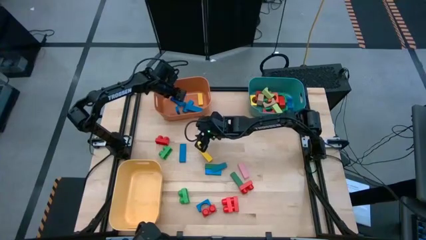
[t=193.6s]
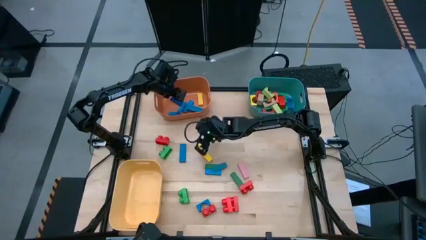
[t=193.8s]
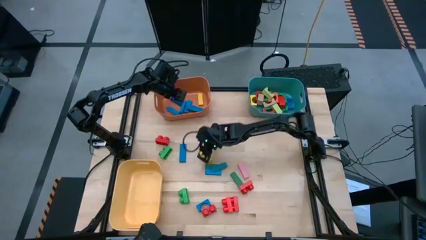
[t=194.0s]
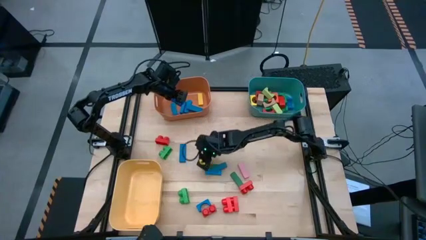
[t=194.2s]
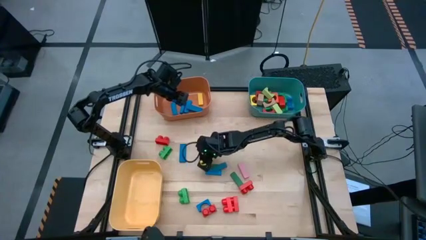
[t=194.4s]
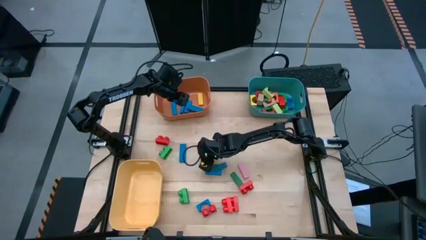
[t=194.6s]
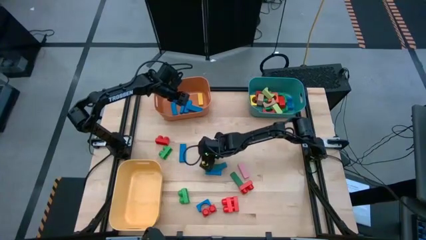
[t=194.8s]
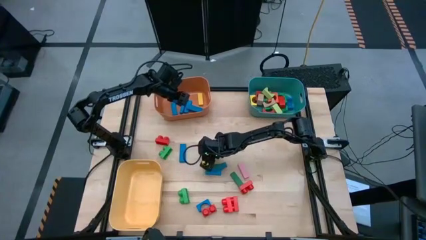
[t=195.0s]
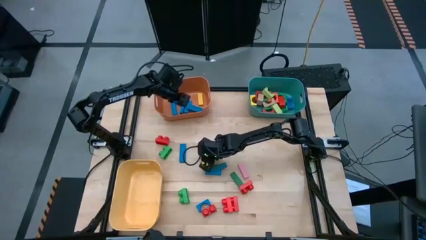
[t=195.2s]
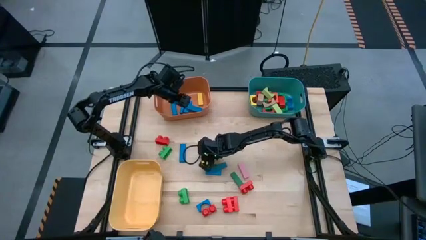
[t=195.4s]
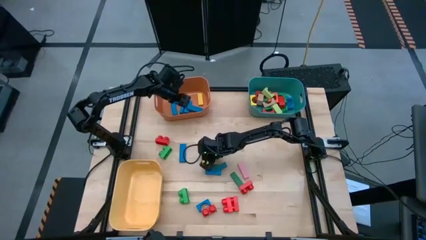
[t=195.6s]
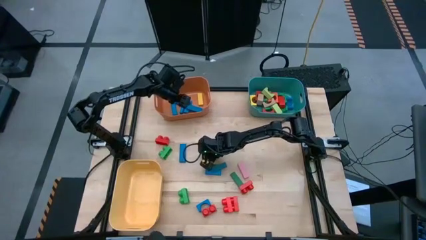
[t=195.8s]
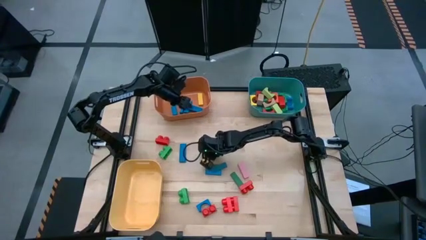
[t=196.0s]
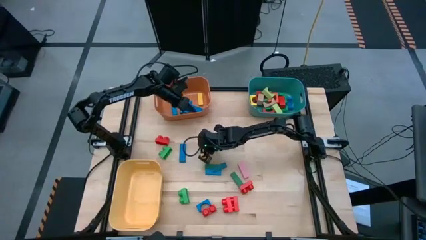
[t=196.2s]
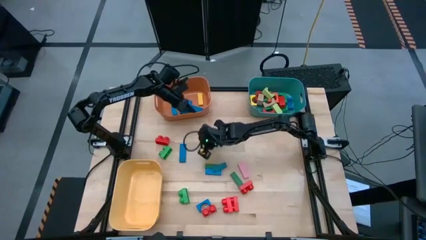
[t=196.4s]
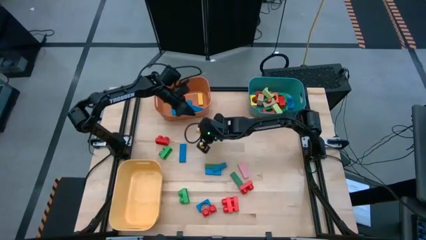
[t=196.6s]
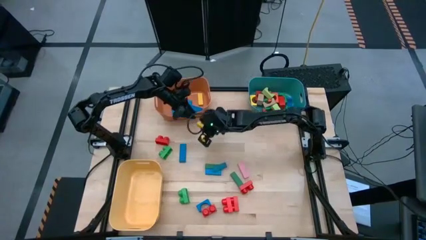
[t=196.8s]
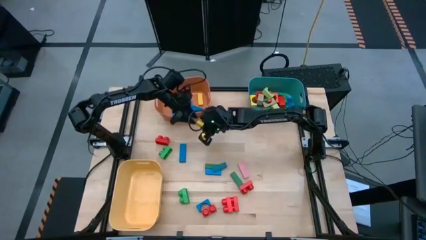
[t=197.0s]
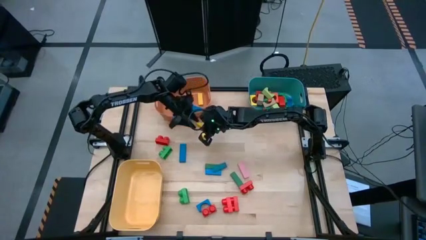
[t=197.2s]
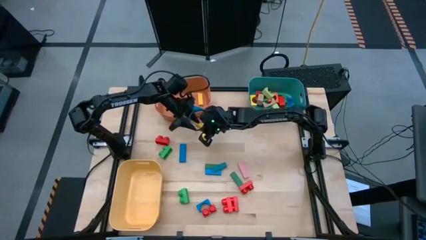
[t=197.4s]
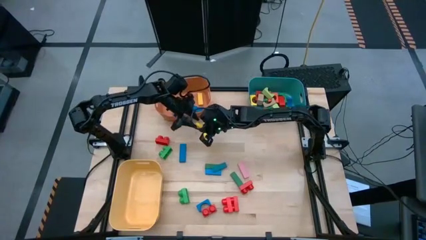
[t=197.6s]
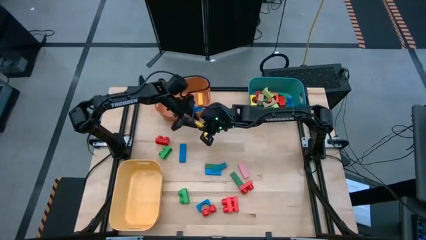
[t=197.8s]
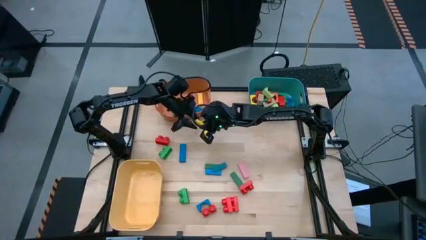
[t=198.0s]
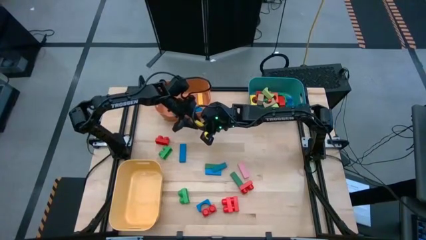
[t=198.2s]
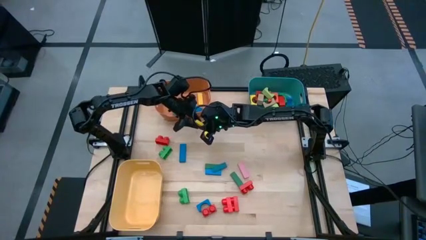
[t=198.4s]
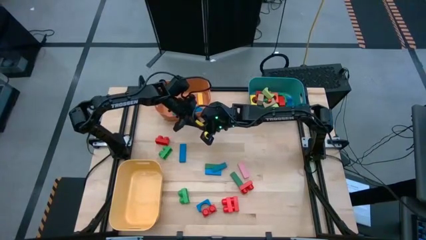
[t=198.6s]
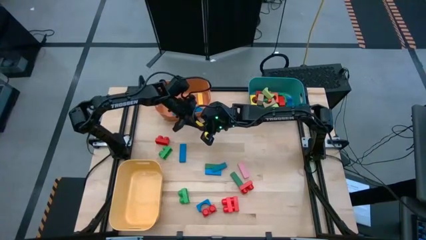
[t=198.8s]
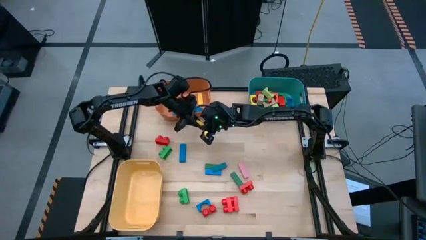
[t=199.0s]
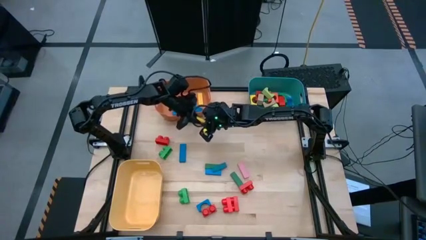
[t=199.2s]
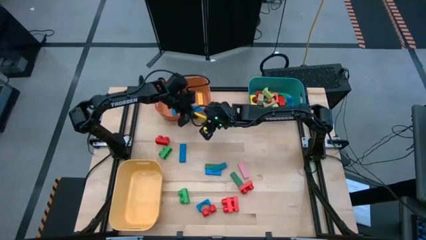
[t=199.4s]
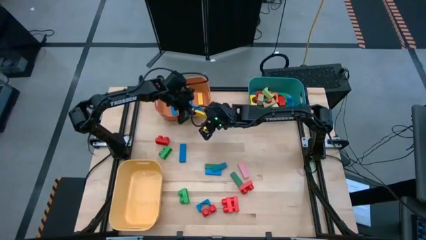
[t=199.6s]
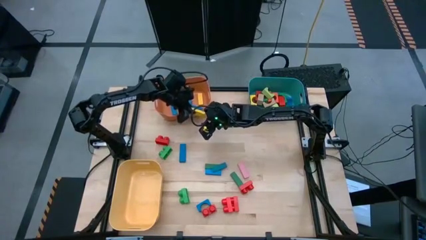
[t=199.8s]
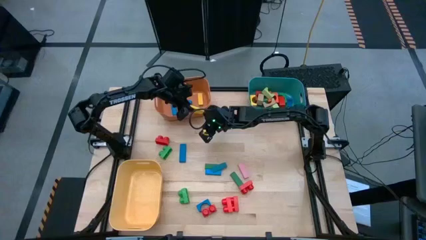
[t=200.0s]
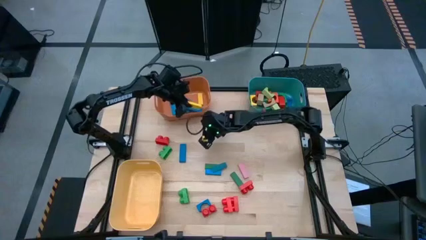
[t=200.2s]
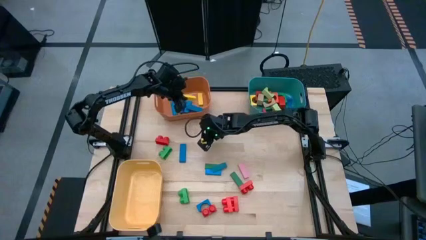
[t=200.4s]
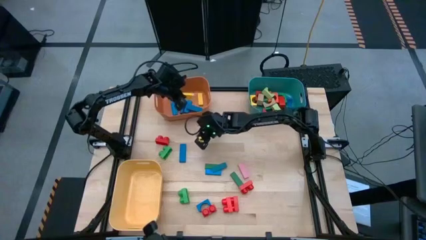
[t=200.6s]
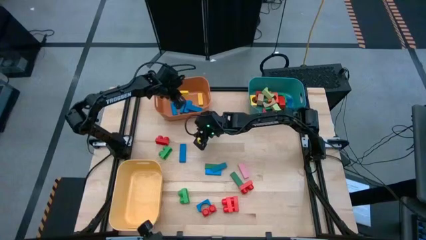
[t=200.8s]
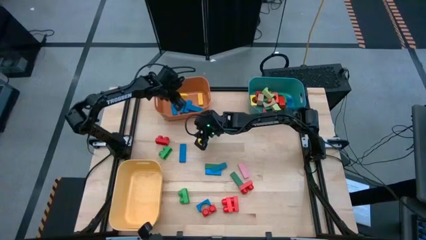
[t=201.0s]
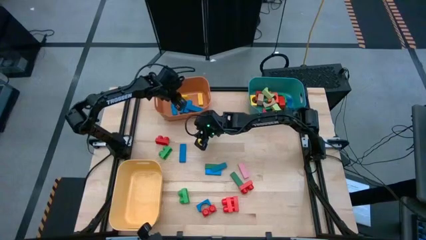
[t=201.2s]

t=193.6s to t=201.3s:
Task: Sort blocks by size
Put the yellow rectangular block into the orange bin

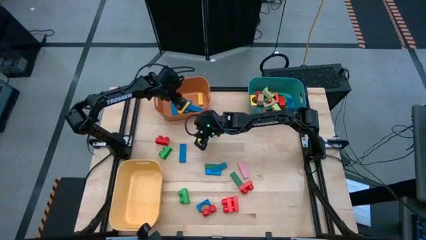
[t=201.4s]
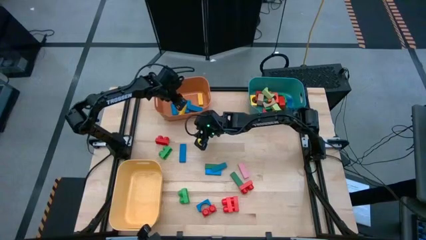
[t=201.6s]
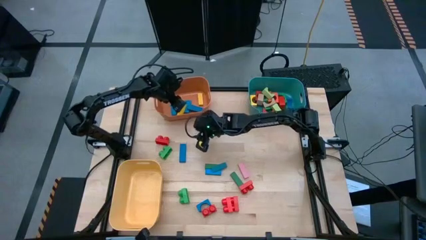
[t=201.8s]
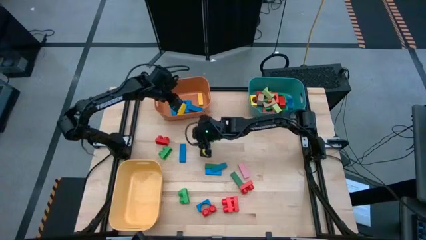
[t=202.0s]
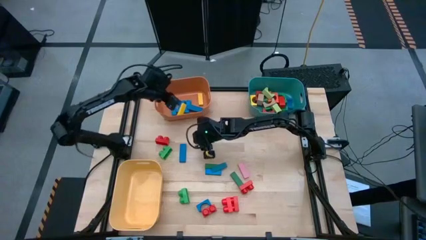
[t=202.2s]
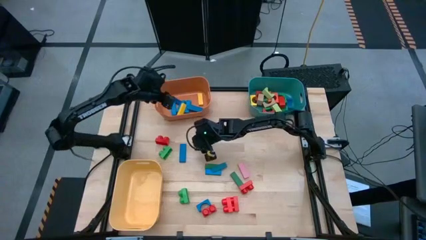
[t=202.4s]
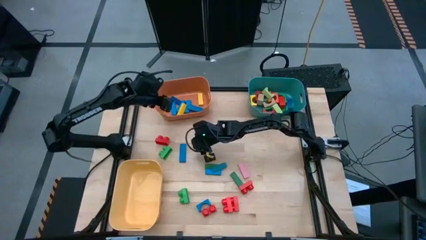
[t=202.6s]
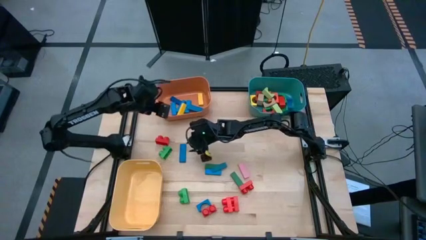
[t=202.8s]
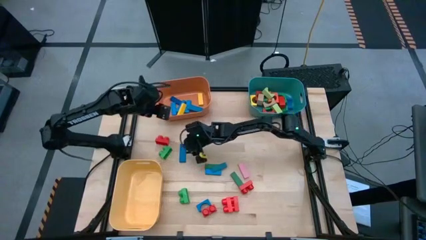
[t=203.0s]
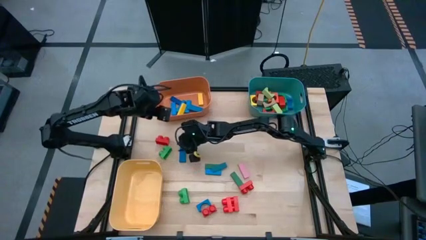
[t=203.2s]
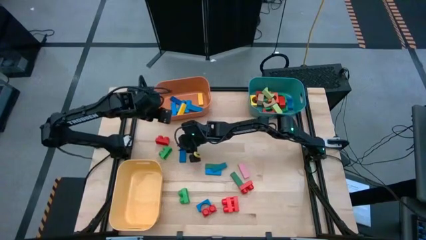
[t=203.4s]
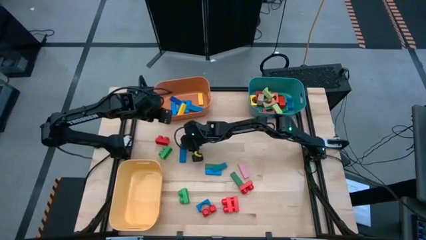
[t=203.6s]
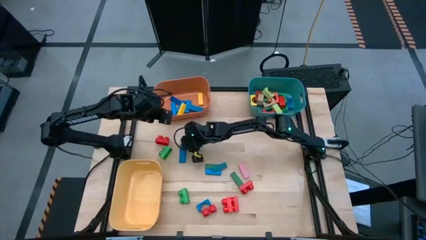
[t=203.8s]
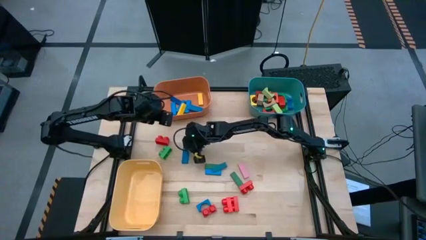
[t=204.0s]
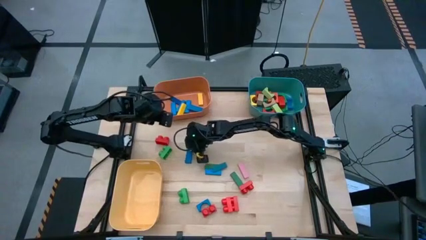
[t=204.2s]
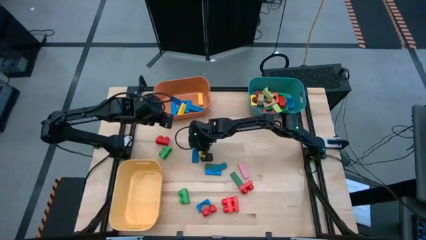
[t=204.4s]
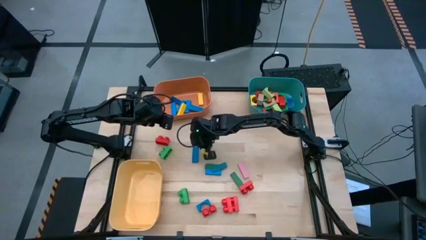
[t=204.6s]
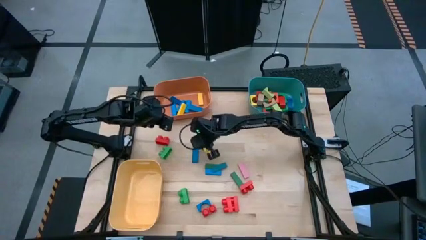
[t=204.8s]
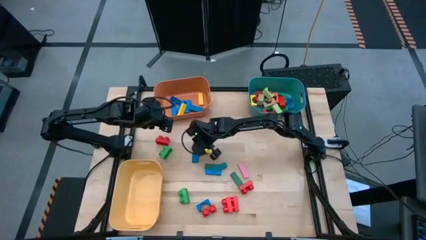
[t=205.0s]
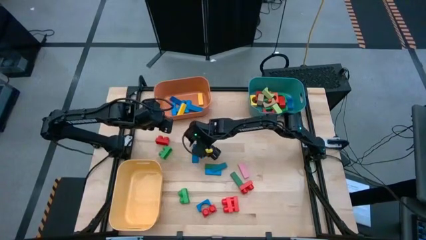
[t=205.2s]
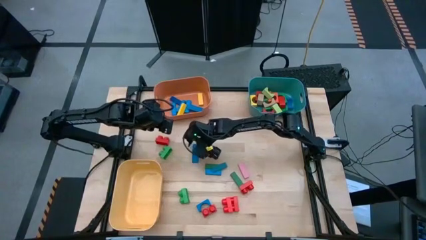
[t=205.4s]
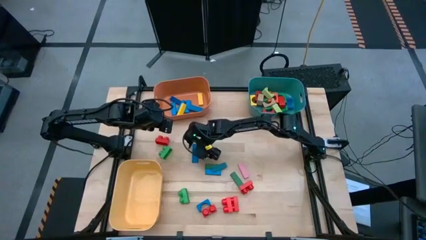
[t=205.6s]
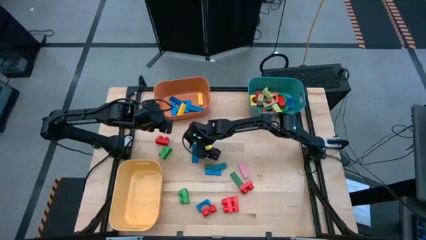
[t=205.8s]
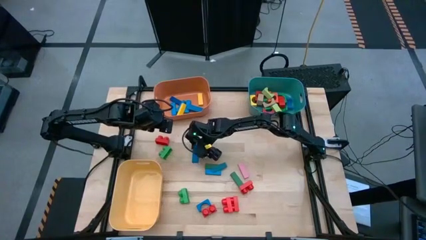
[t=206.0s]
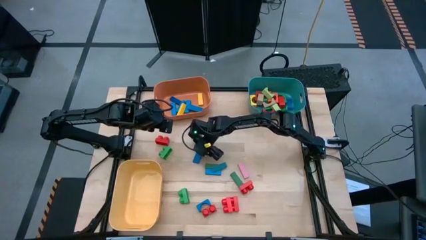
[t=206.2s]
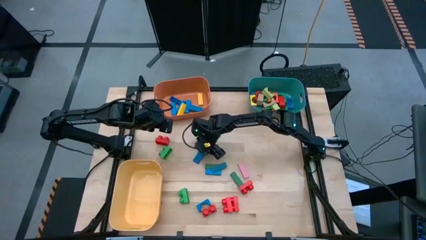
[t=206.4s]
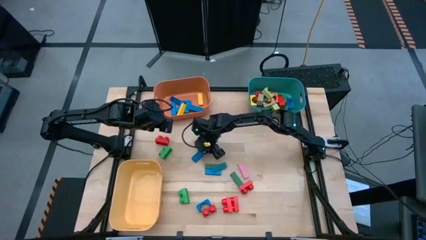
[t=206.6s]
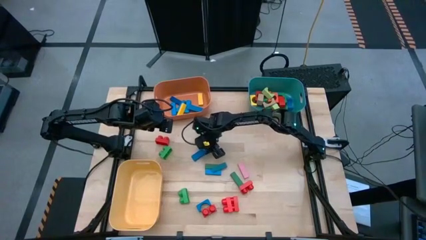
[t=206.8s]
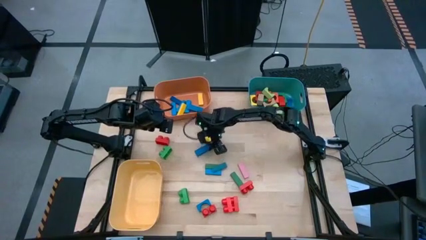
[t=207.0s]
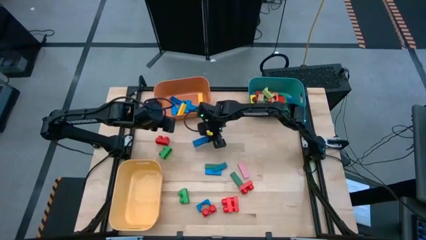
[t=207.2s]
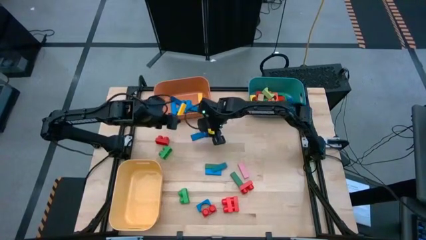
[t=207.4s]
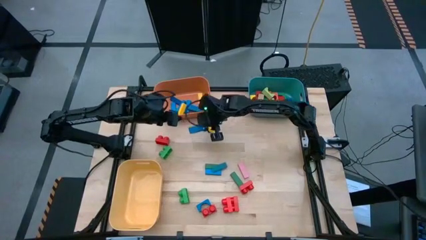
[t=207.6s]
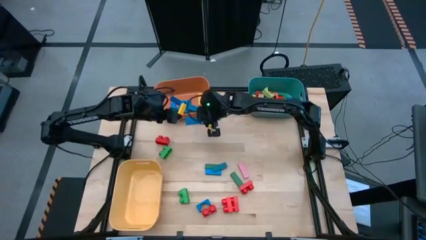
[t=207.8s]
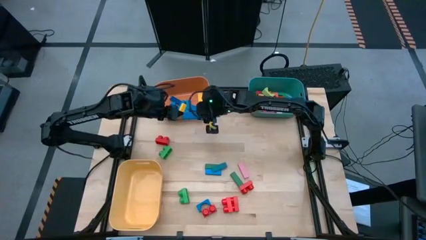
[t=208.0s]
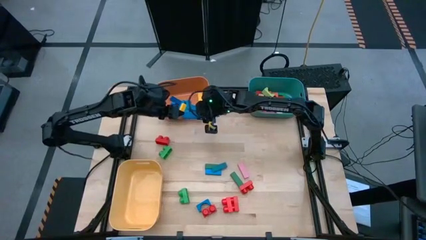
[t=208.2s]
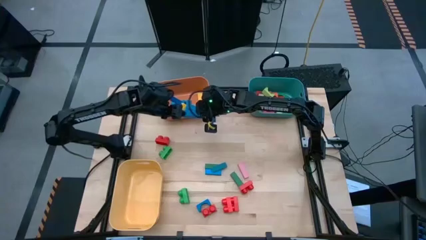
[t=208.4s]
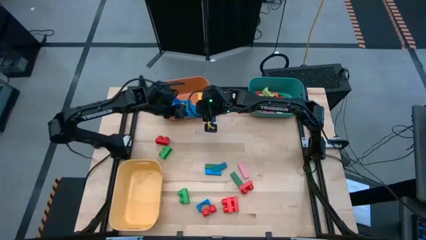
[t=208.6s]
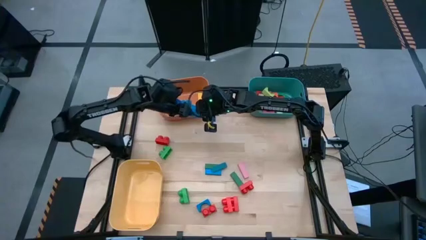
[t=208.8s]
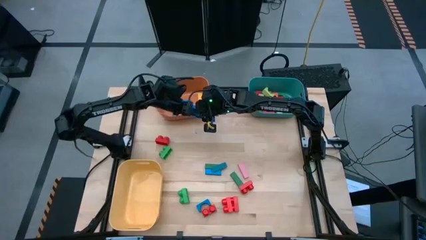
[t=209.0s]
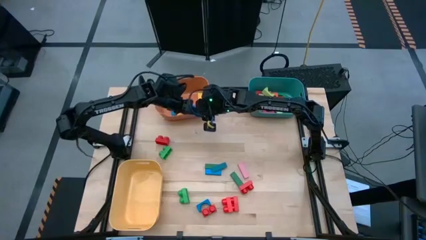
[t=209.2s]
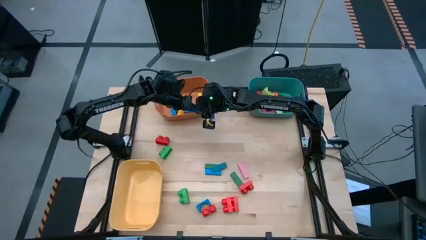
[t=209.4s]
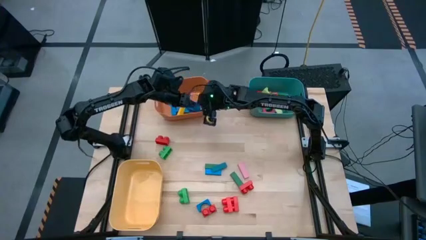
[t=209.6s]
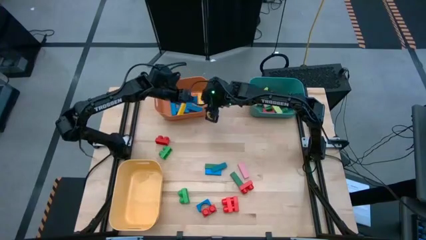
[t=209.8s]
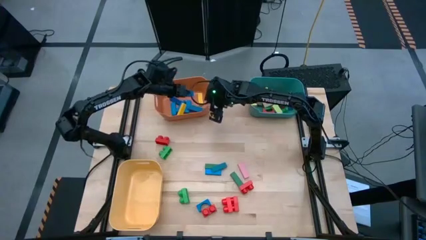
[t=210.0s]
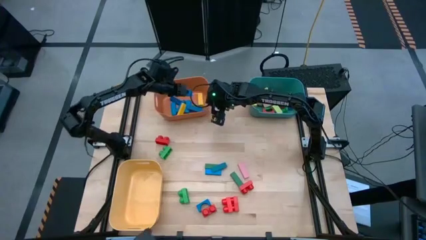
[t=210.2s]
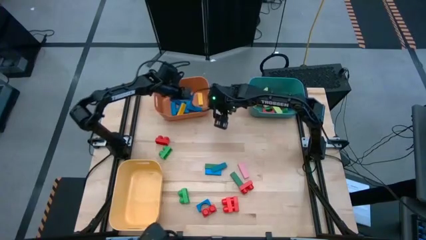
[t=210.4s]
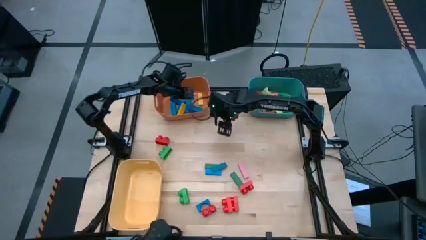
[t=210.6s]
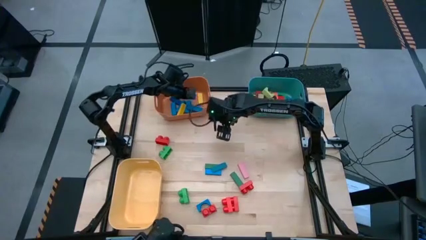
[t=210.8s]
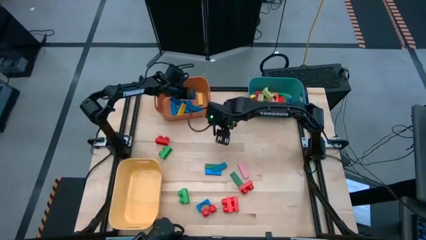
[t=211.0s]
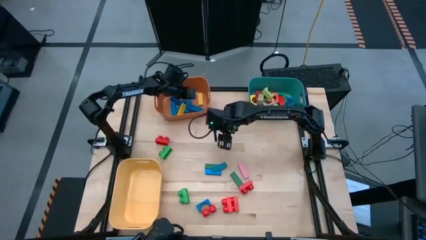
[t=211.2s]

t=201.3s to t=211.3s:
Put the blue rectangular block into the orange bin
